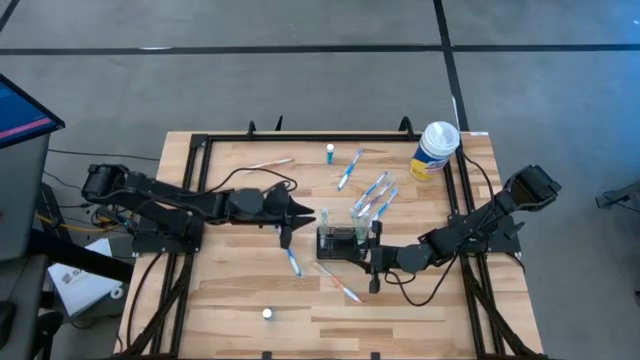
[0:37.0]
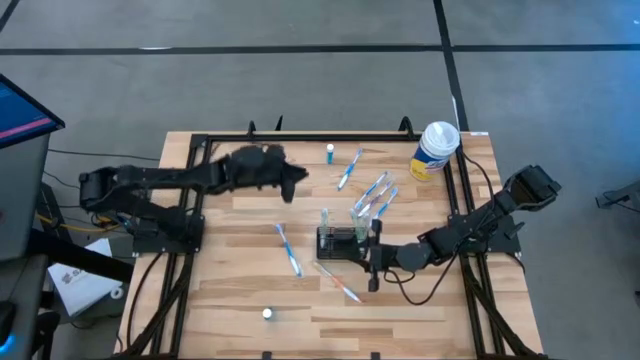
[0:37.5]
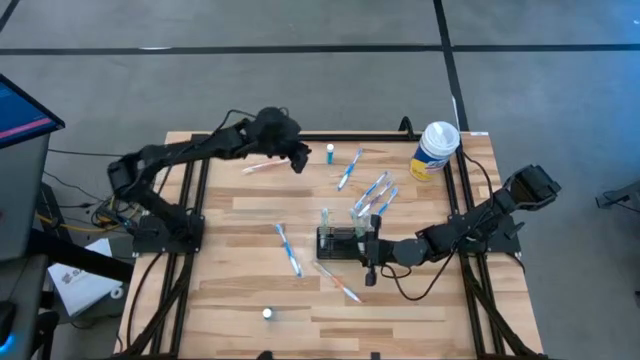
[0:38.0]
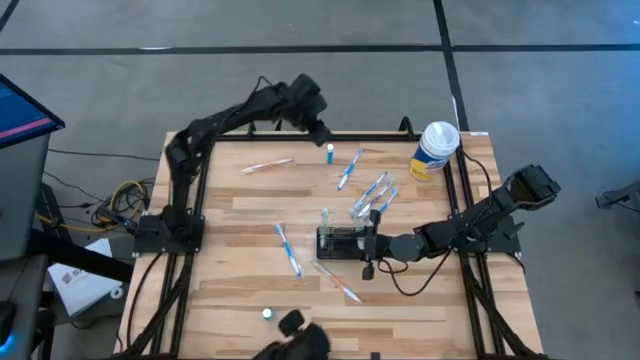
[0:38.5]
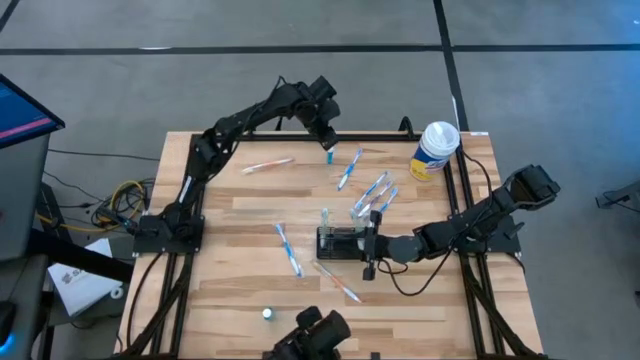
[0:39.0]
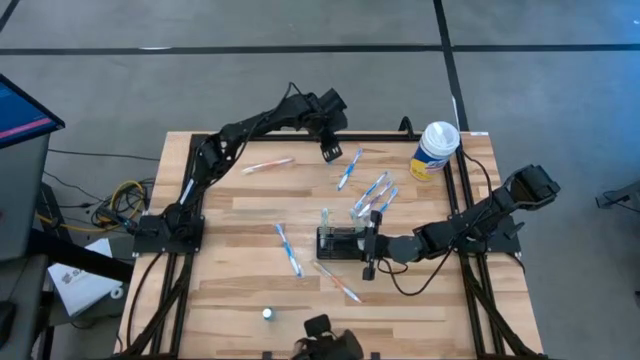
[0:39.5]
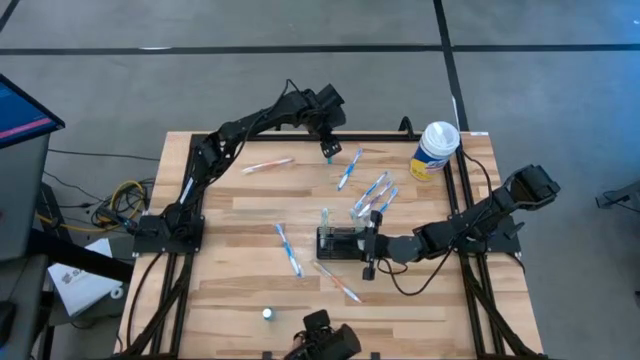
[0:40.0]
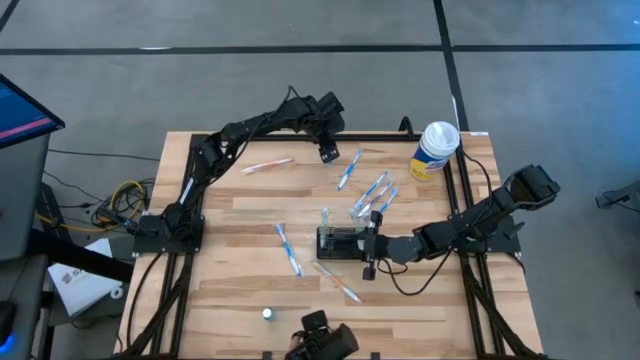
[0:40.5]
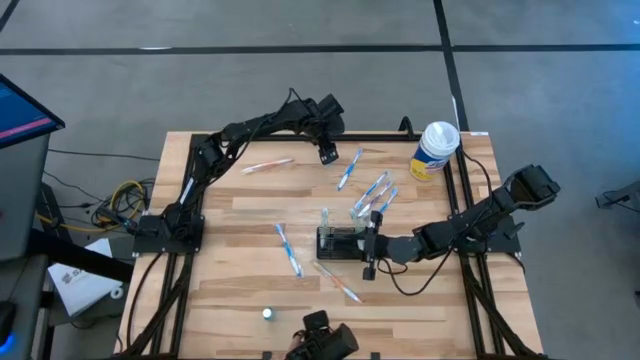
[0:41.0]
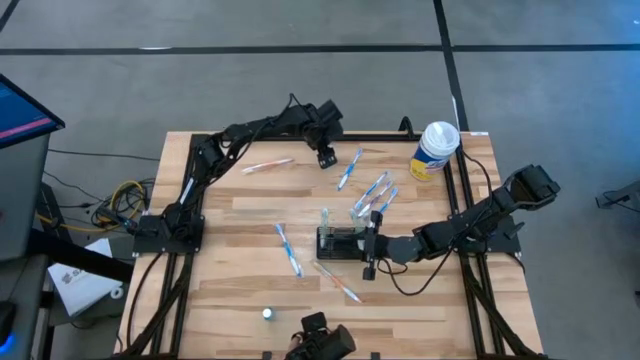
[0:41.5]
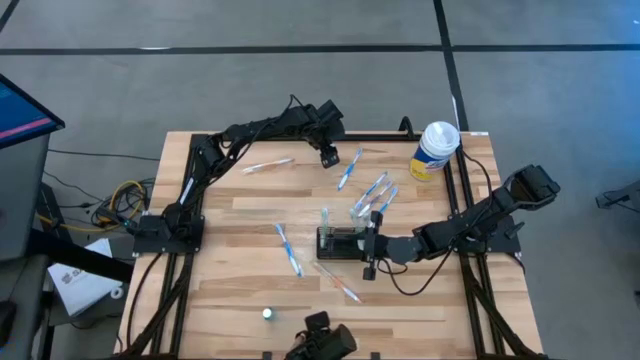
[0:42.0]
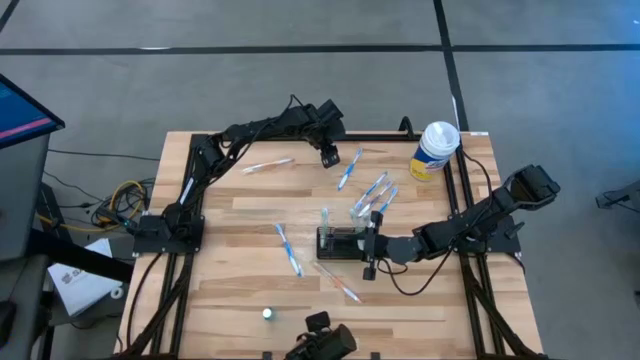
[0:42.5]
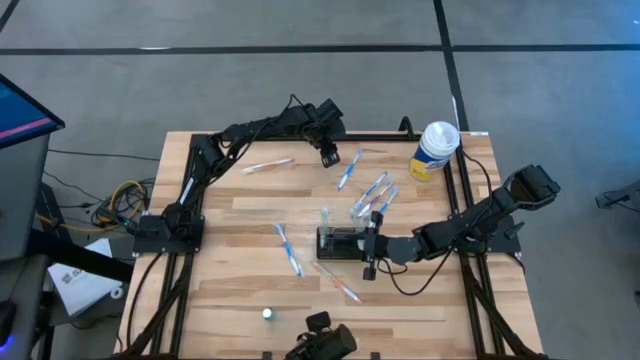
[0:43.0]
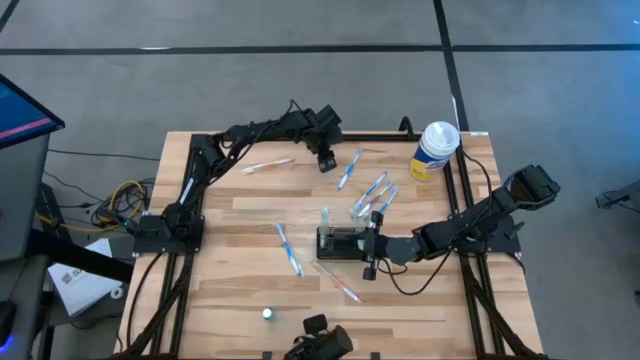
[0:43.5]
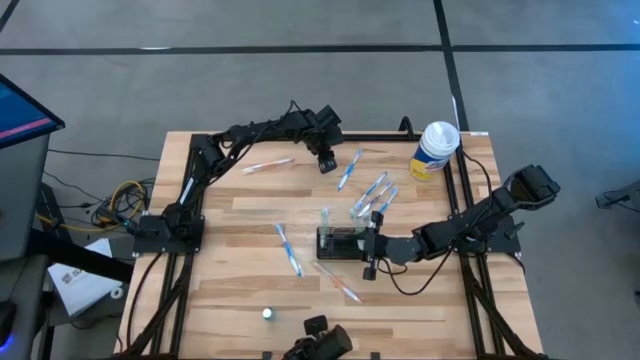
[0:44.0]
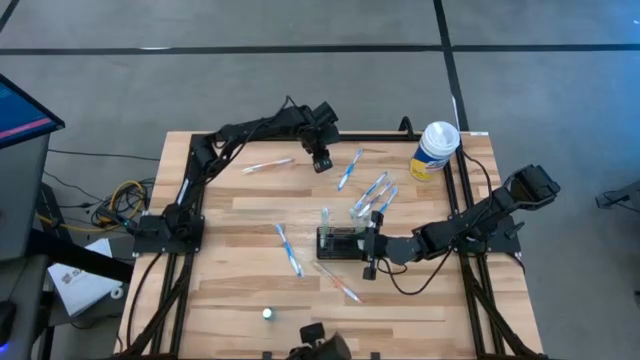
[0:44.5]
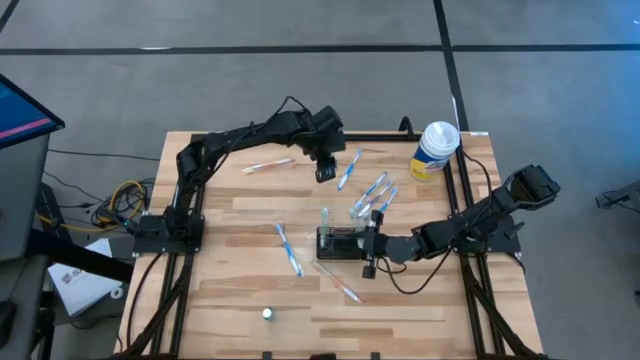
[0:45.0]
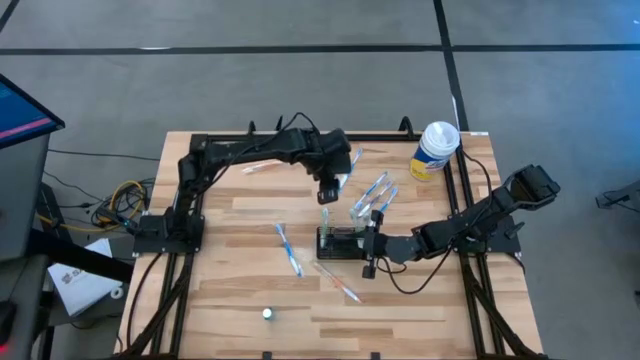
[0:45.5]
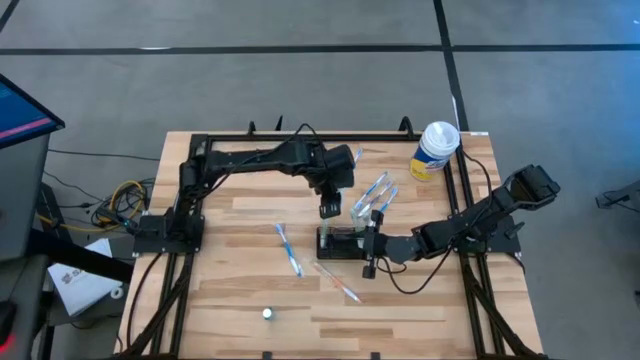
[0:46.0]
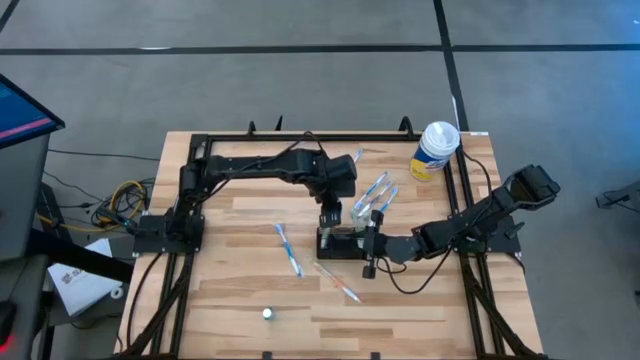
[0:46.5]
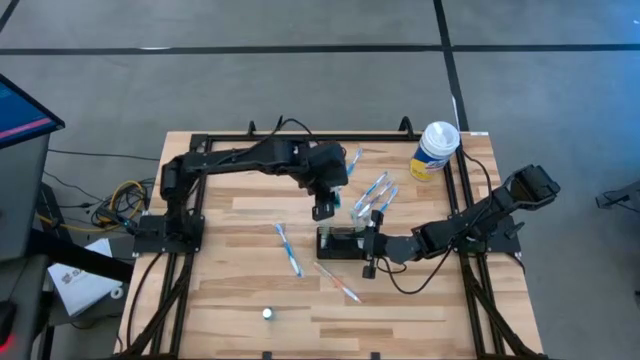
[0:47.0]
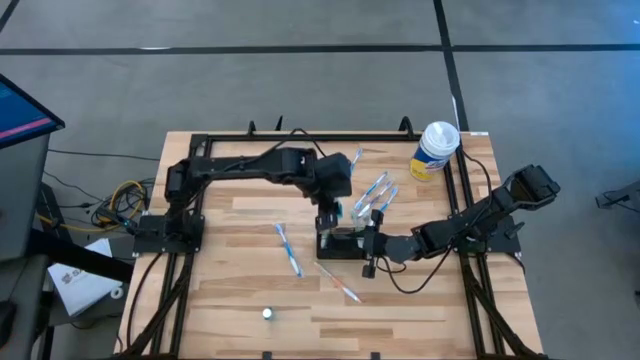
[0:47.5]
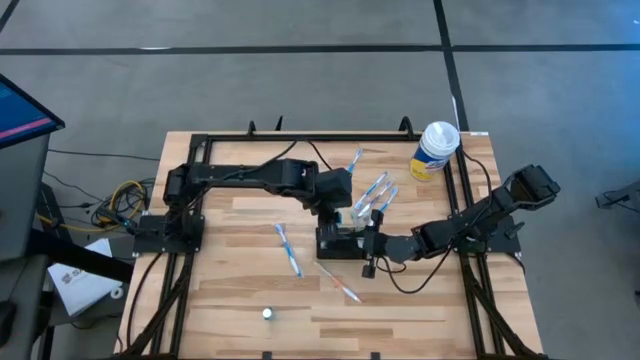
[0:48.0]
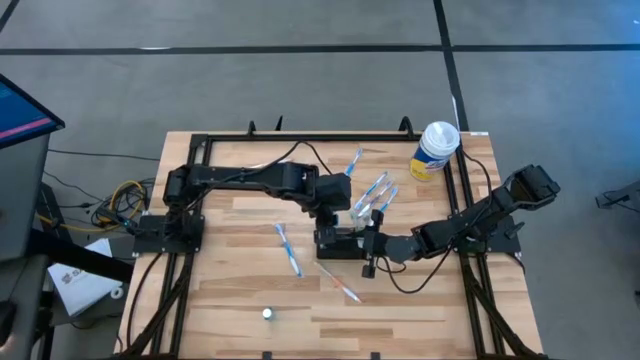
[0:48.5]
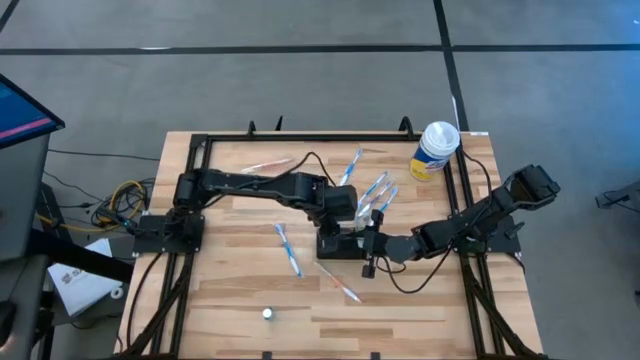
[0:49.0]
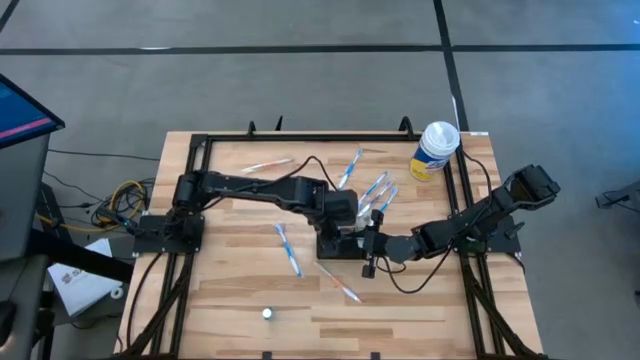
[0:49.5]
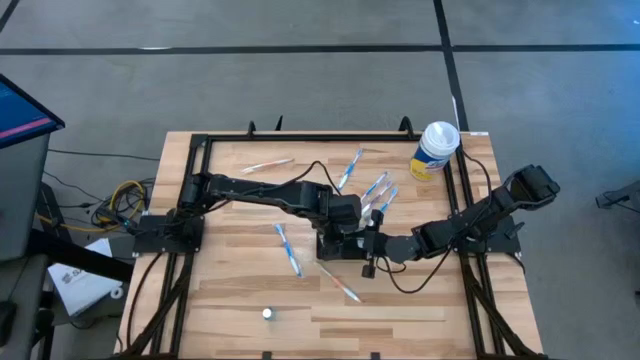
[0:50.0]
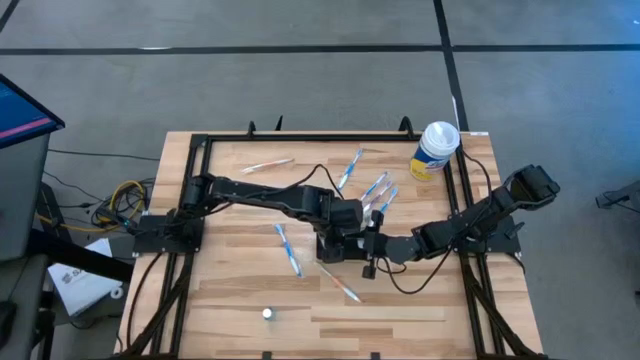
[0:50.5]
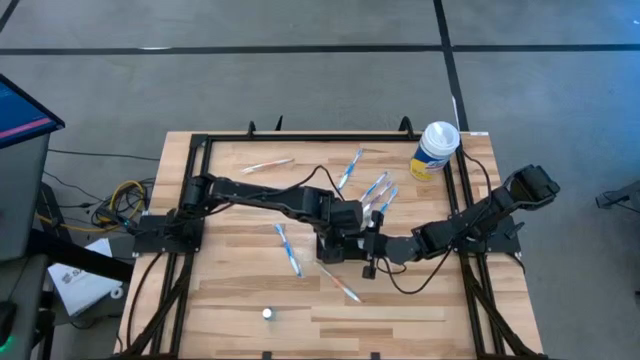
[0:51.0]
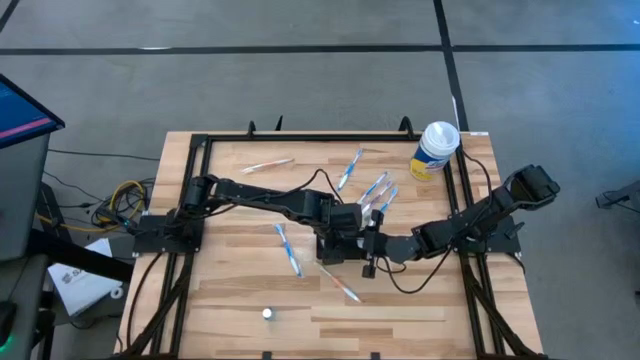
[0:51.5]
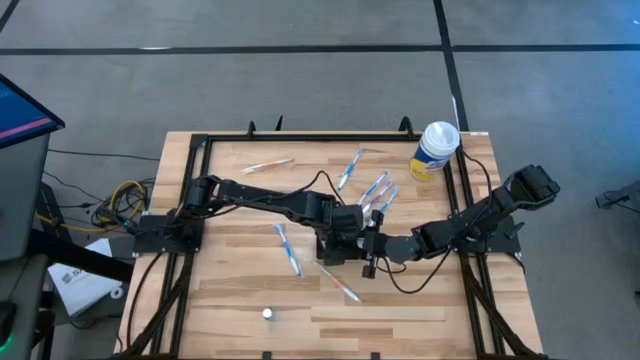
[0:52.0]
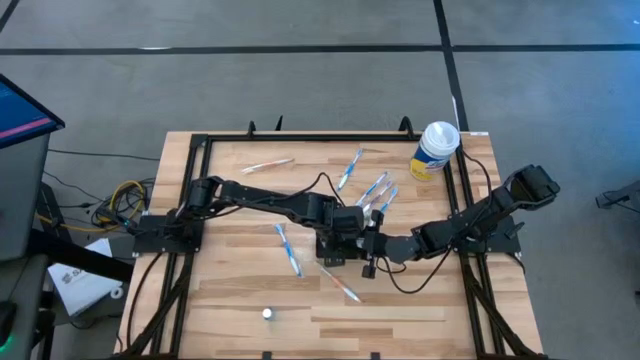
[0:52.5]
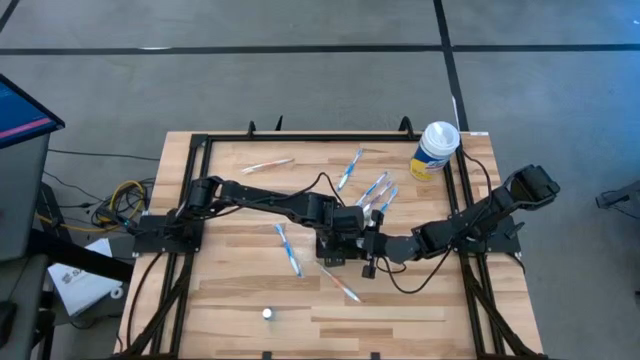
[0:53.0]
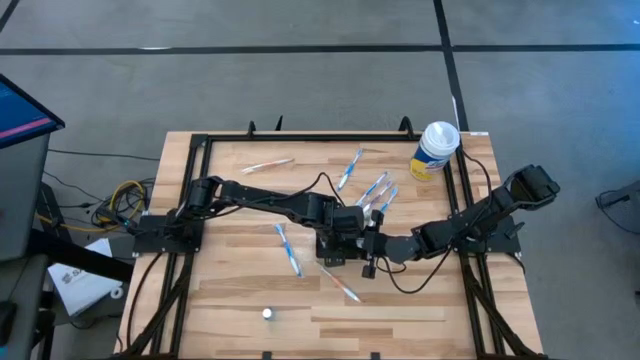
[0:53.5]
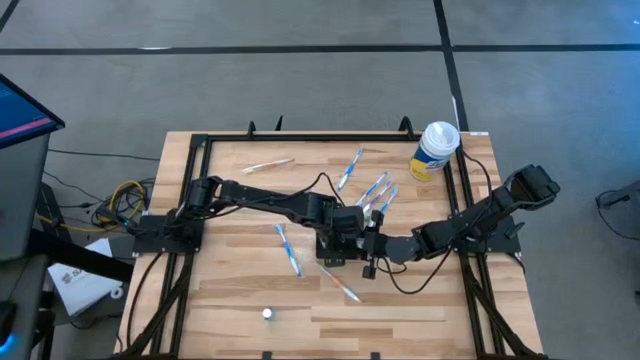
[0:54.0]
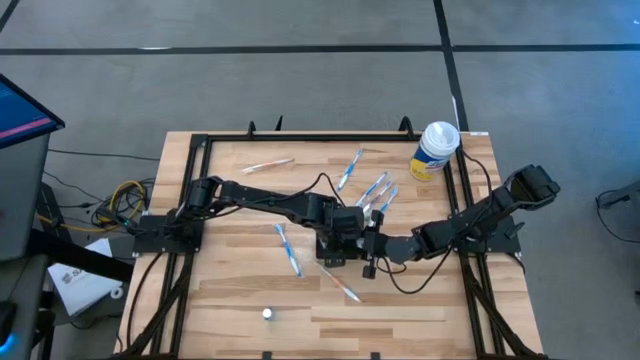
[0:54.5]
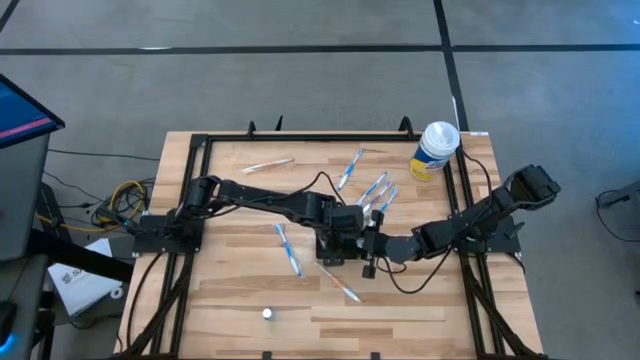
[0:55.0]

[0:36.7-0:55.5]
Task: Pick & Place toothbrushing station
Put the blue mouthwash into the wire organizer
